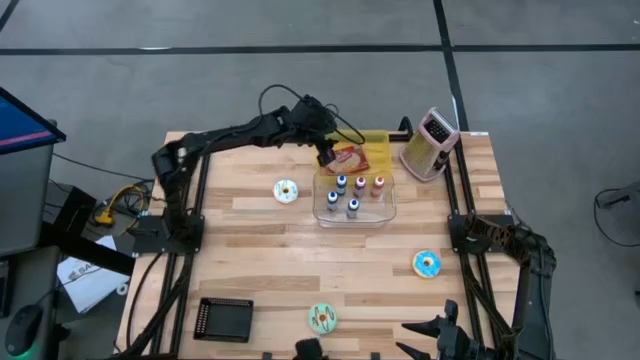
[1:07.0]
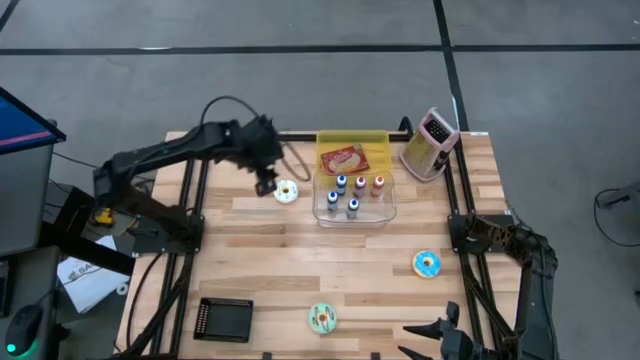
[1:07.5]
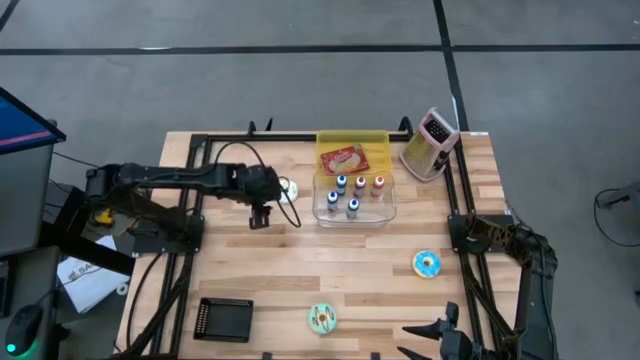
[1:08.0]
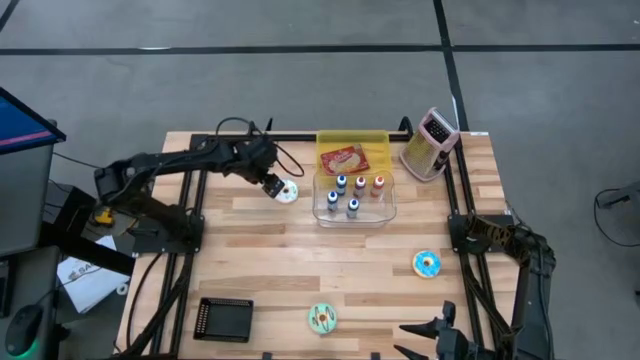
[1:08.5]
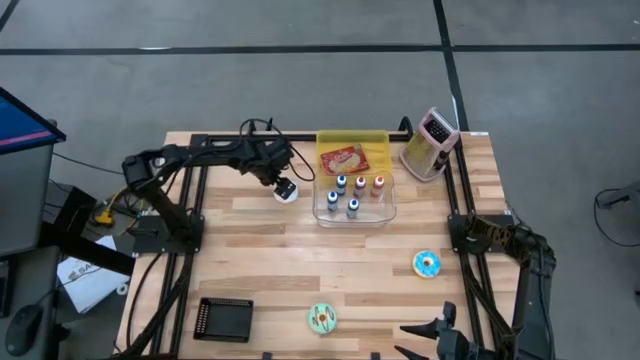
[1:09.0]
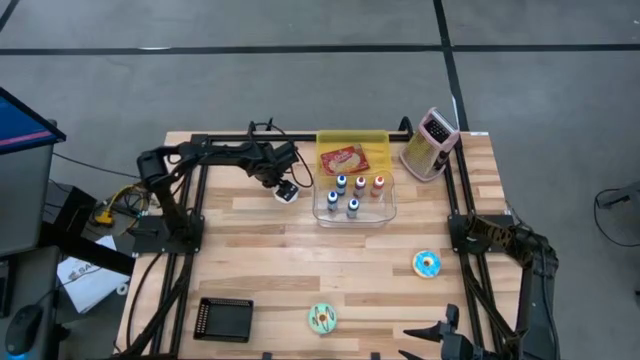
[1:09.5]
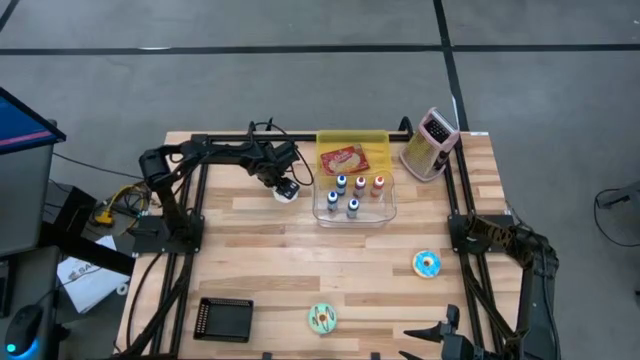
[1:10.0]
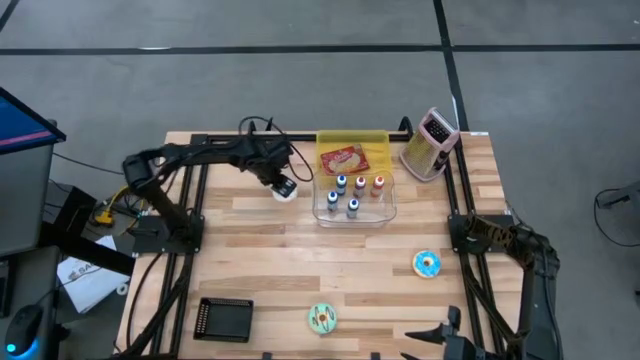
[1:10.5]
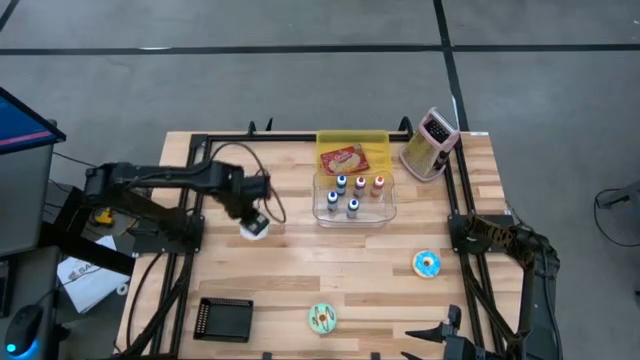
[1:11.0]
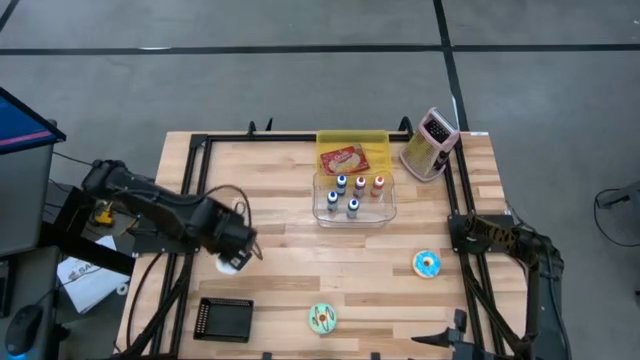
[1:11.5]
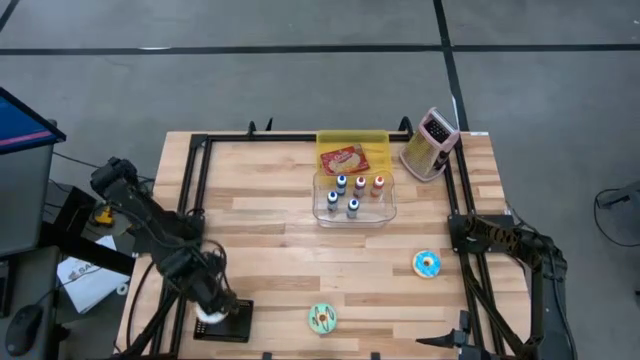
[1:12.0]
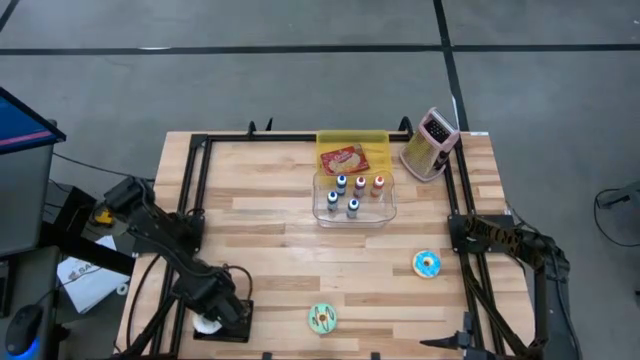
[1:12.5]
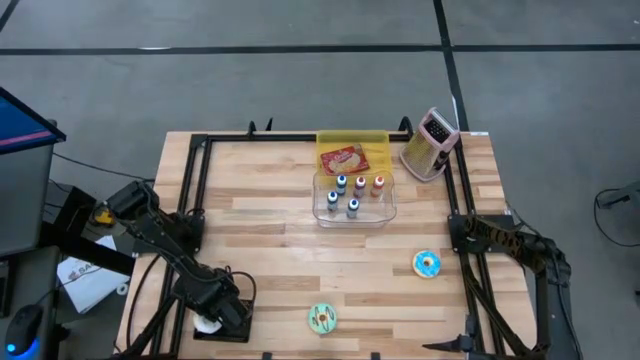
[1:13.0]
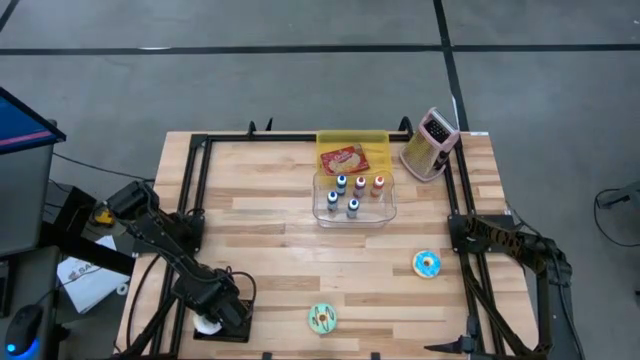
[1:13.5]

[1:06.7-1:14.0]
Put the white donut into the black bin

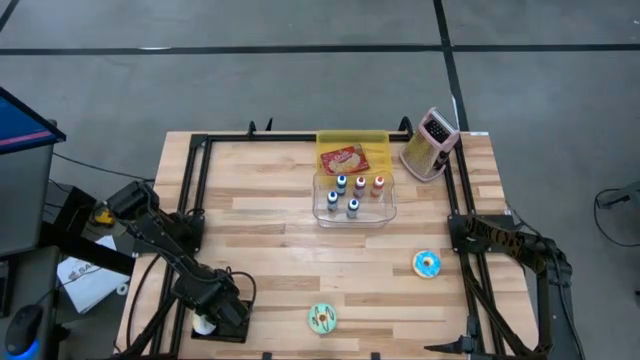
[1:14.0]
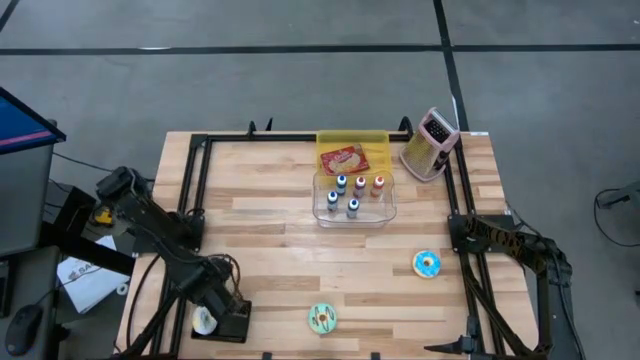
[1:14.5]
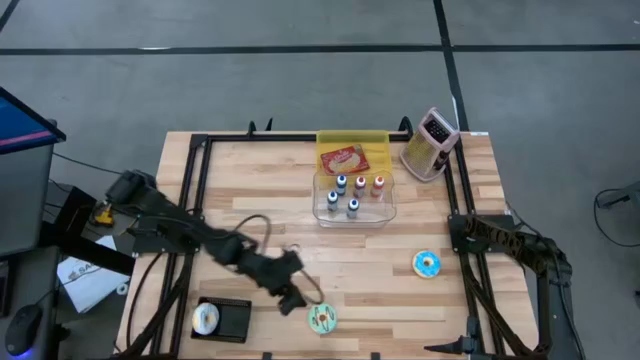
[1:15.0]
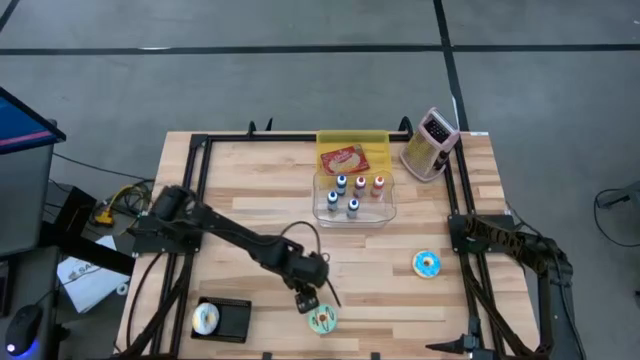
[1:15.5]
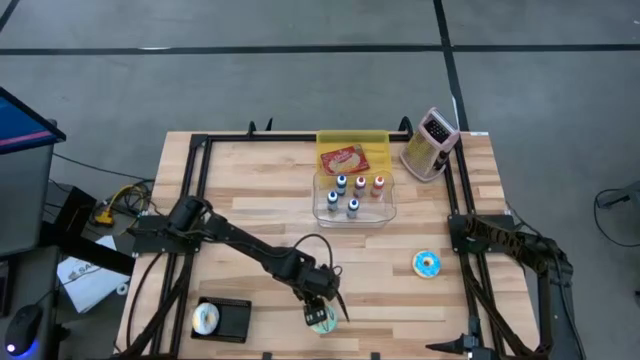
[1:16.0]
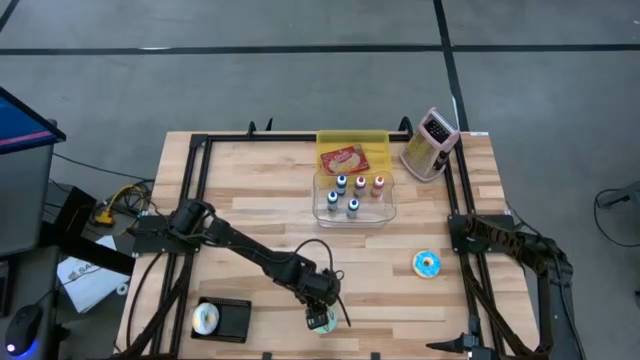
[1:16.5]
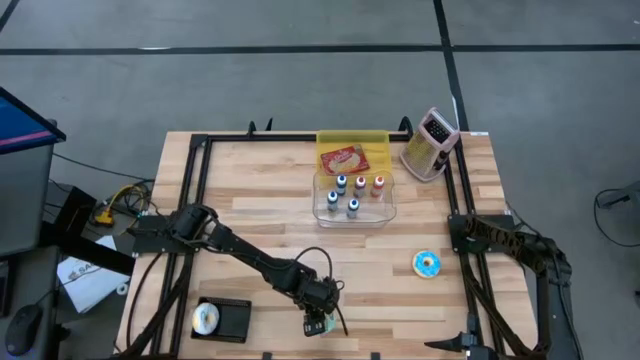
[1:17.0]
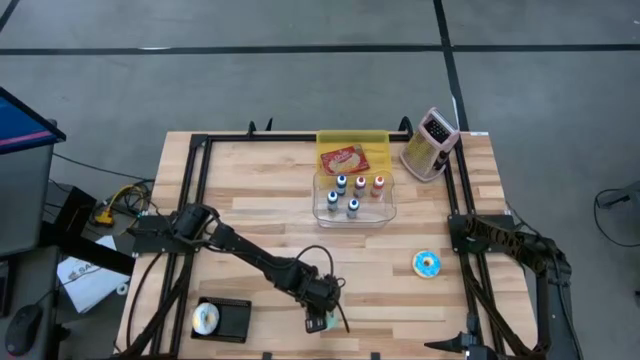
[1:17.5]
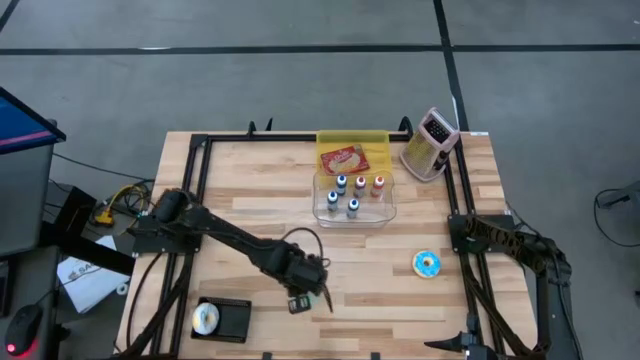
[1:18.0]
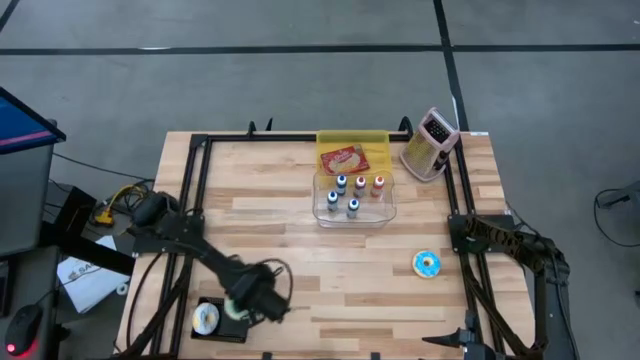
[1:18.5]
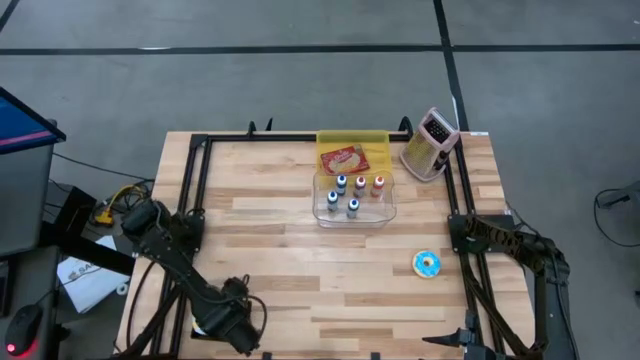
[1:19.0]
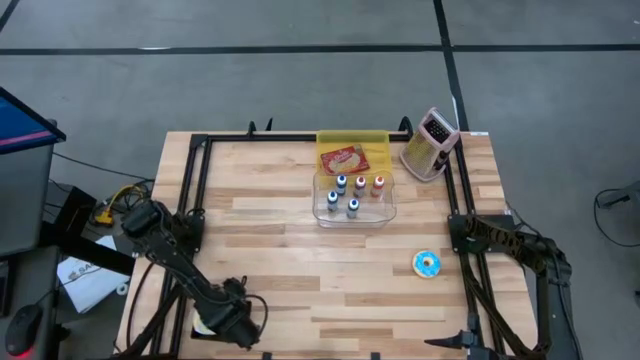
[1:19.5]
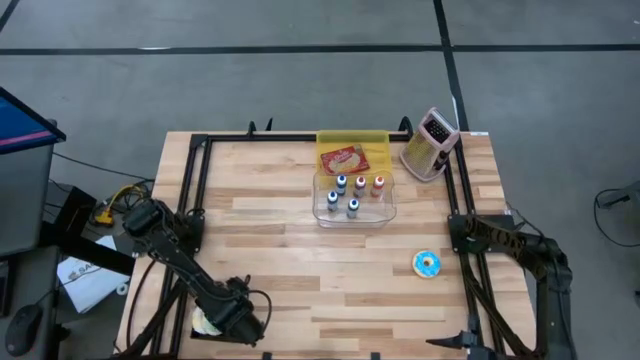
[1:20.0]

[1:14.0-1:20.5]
Put the light blue donut into the black bin

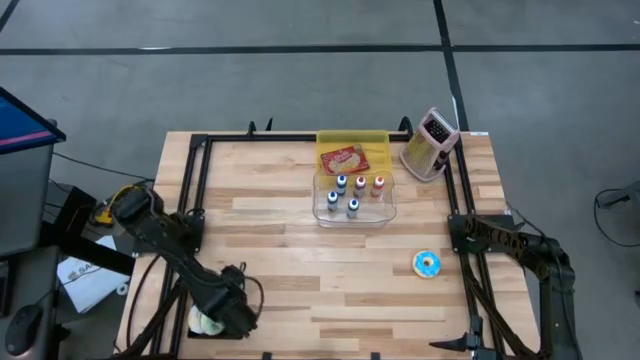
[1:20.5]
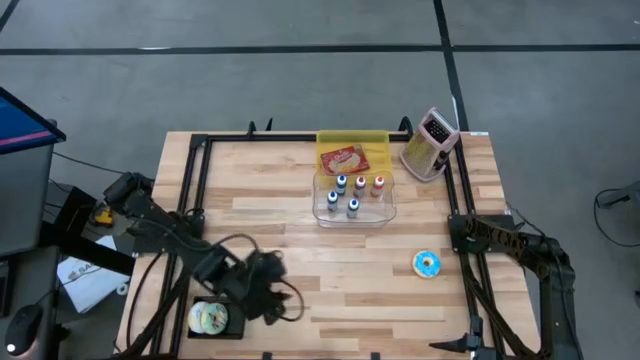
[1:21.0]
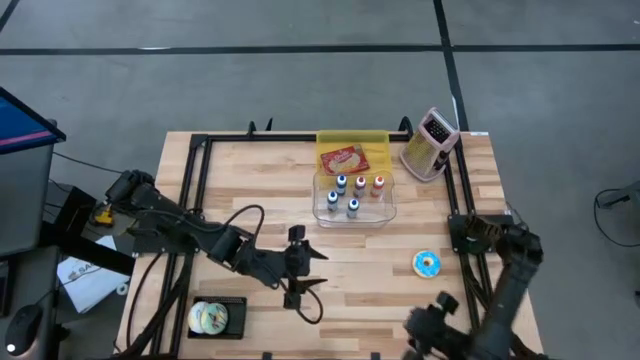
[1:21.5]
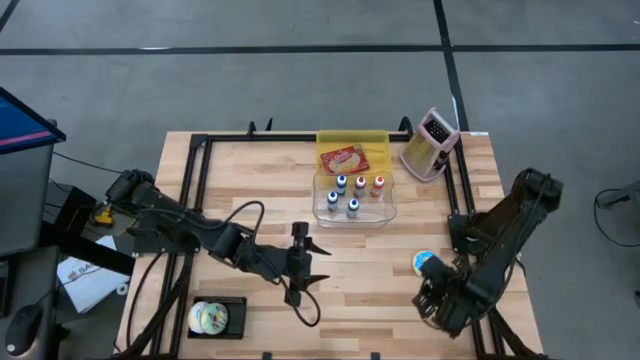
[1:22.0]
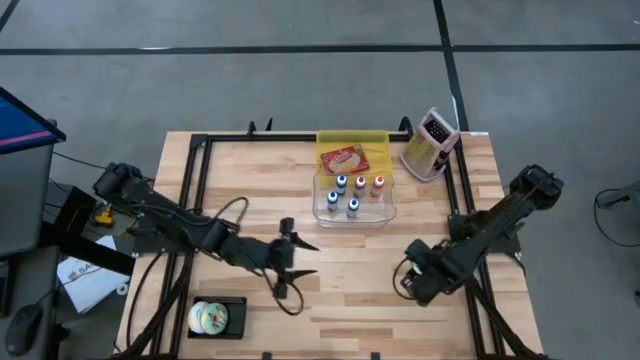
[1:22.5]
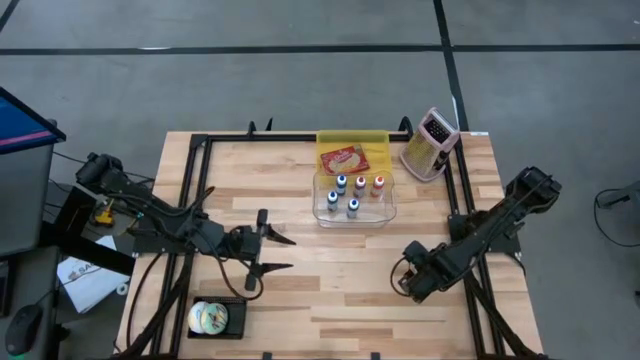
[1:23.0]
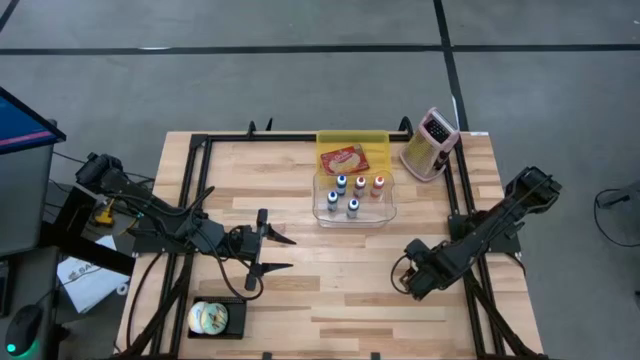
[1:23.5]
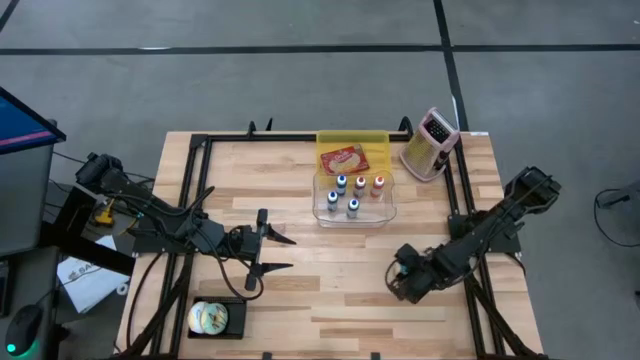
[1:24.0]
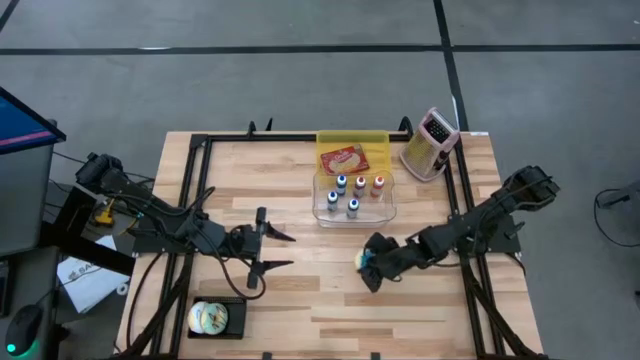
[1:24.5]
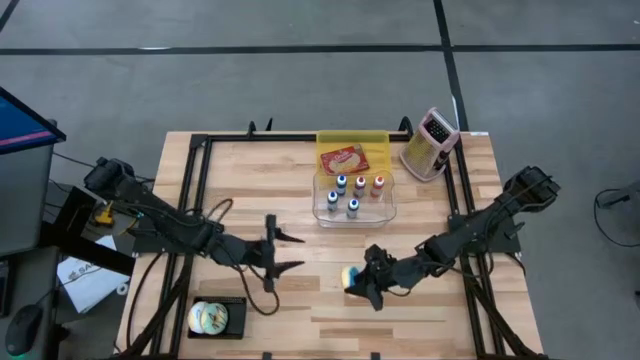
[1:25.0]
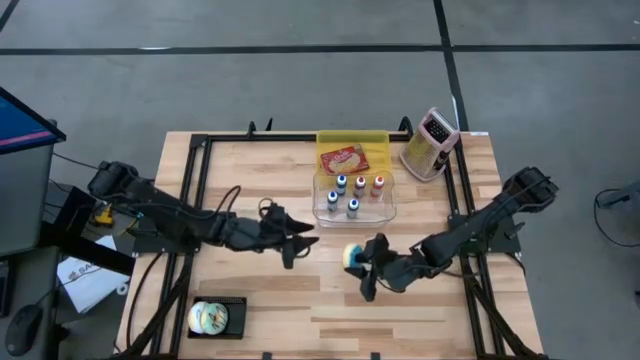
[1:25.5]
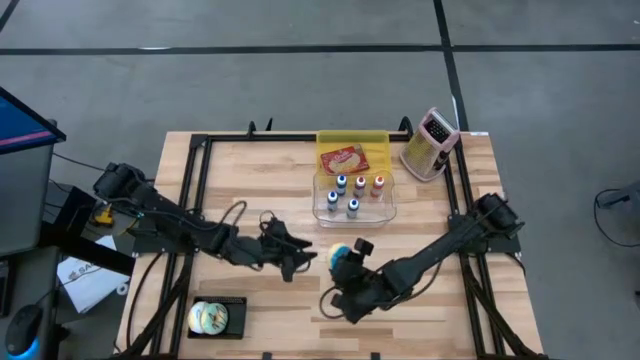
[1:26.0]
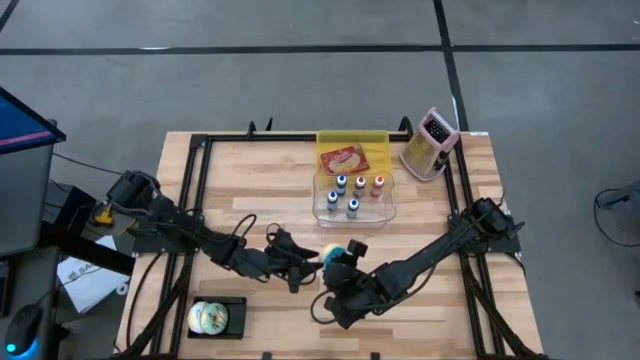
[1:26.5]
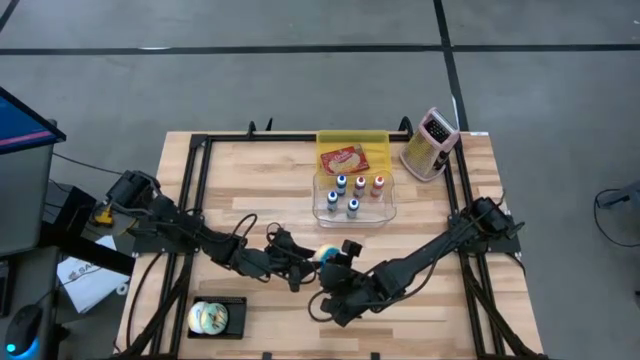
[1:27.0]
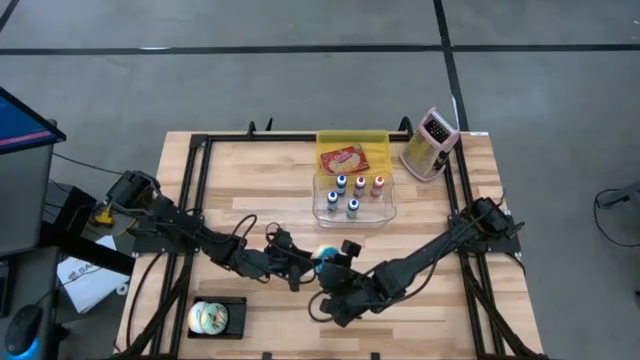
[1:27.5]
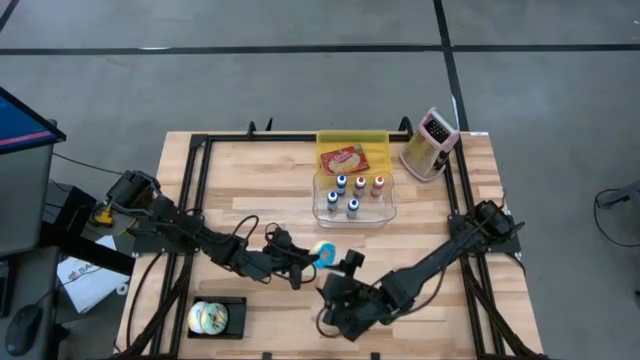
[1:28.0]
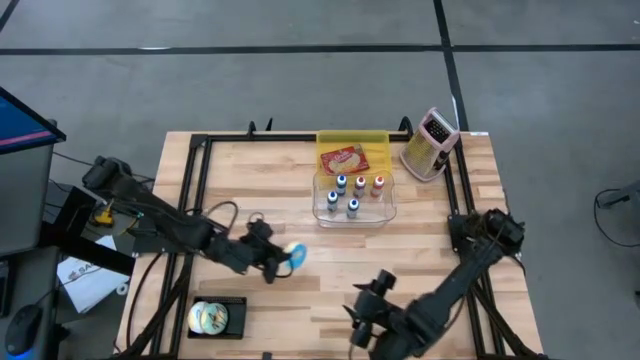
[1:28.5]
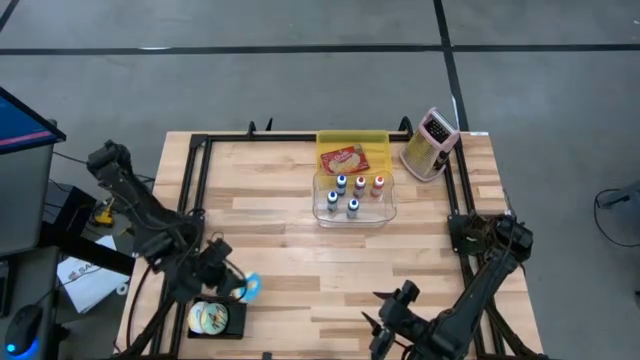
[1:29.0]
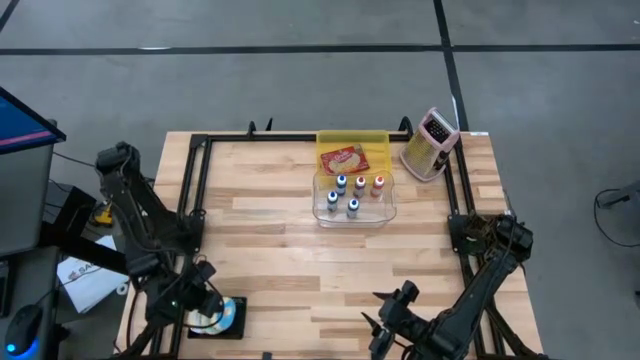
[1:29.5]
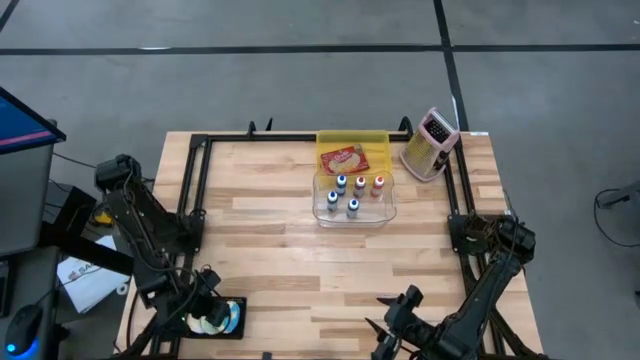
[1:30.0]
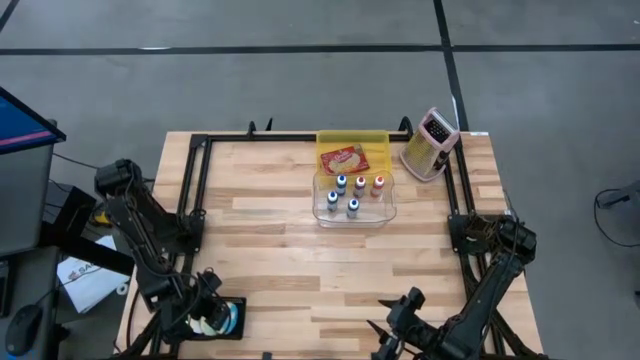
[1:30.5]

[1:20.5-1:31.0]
Put the blue donut into the black bin
